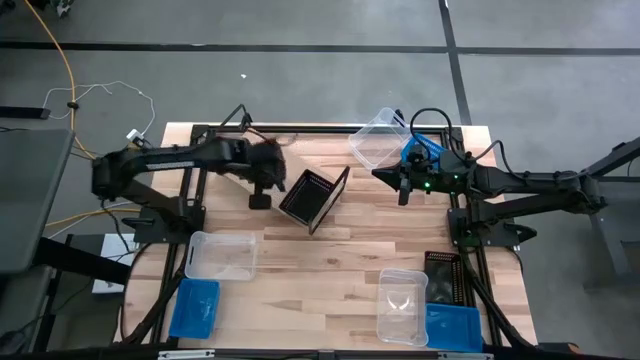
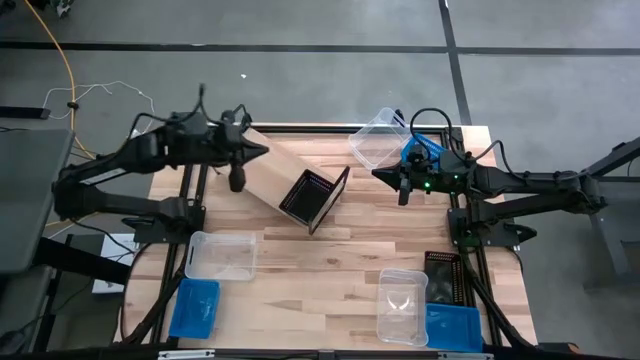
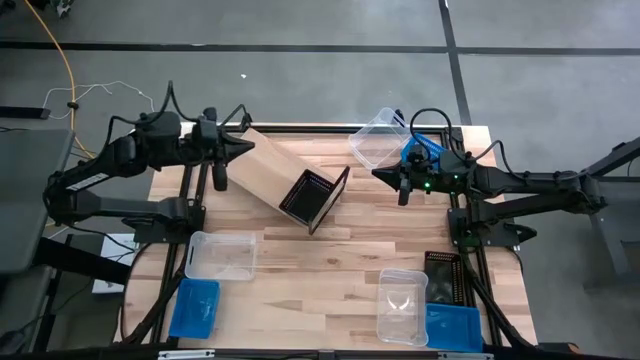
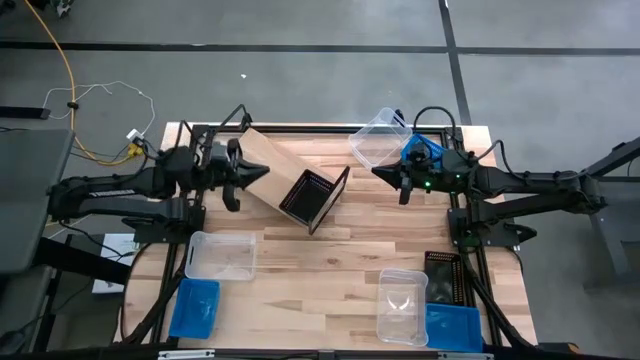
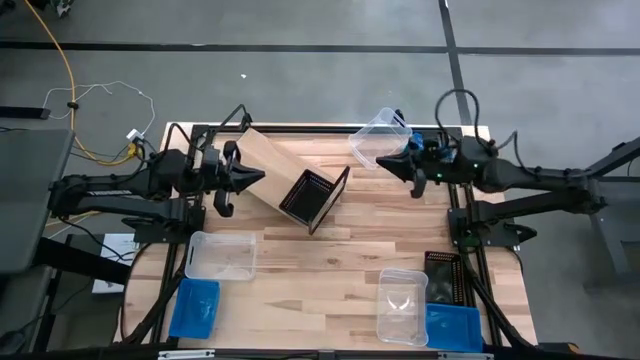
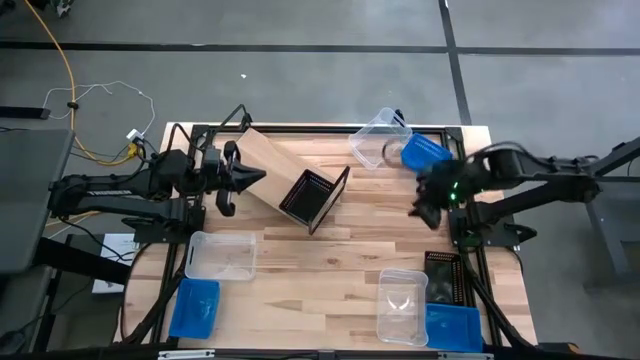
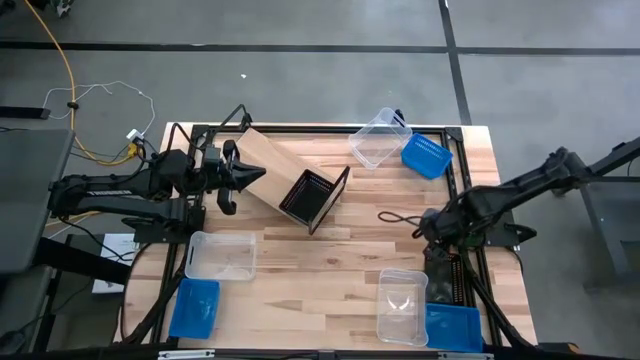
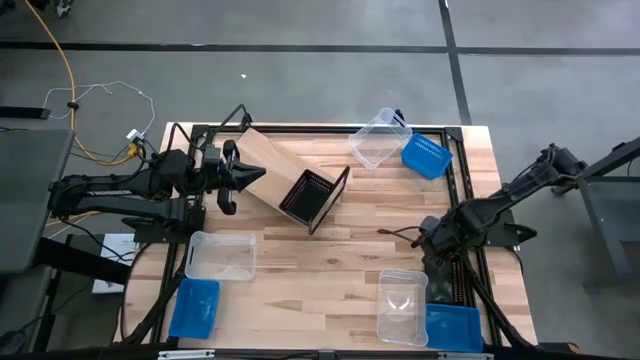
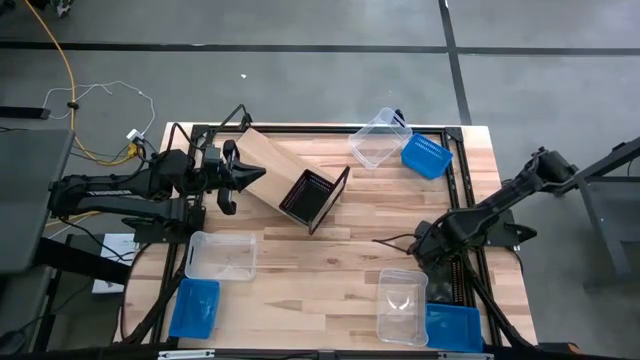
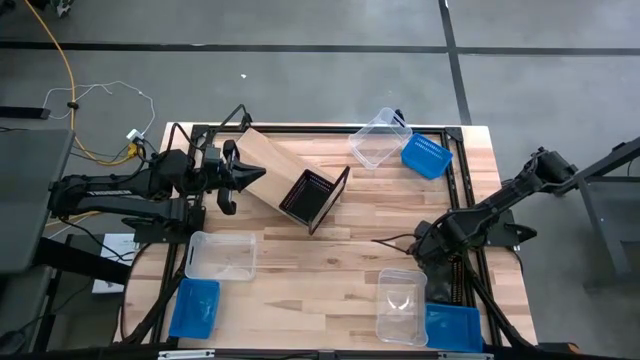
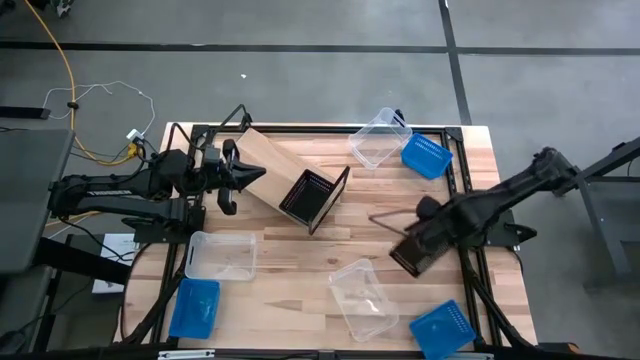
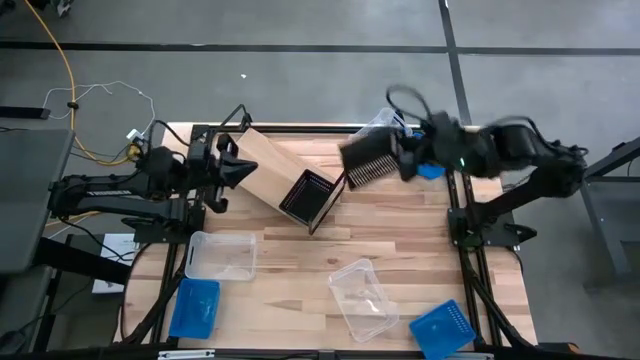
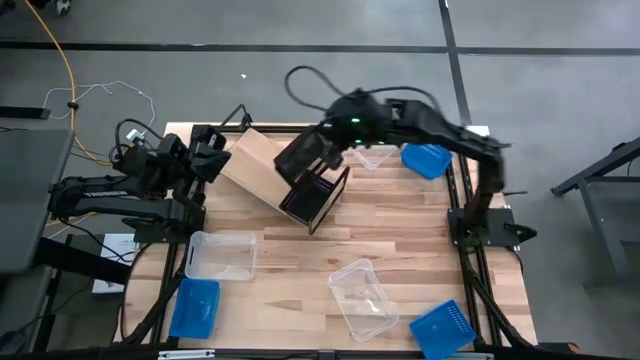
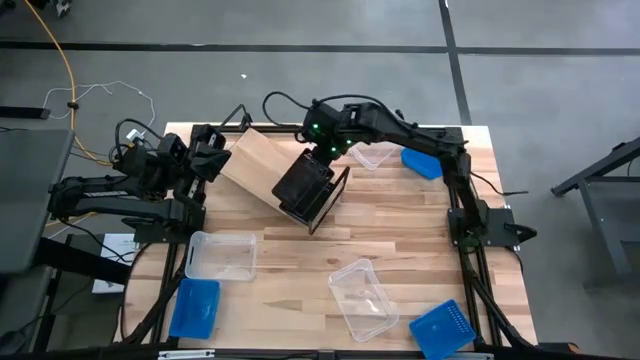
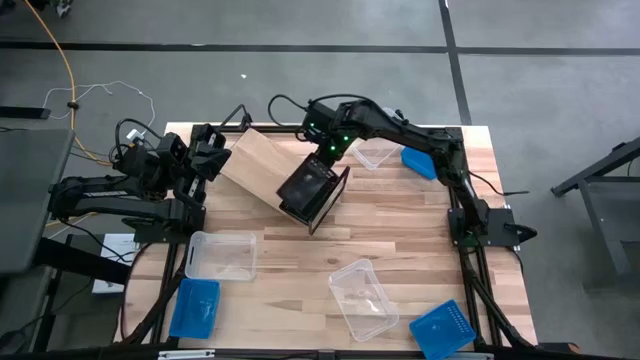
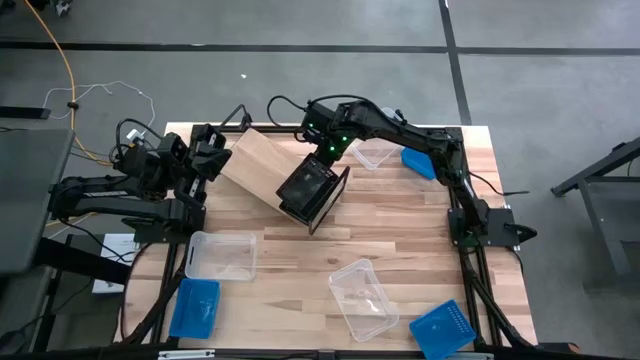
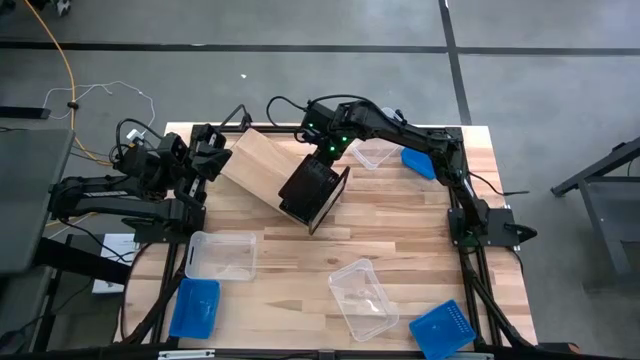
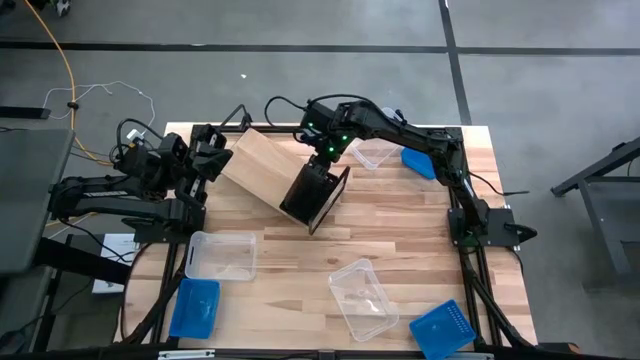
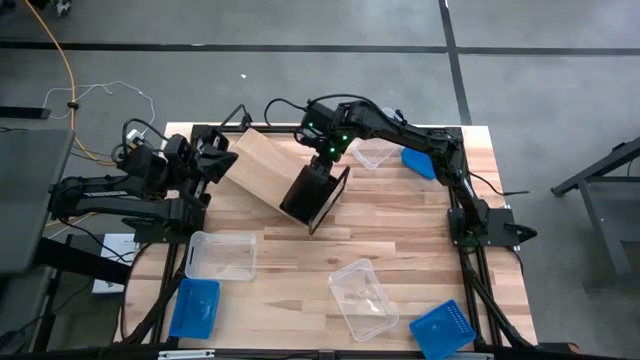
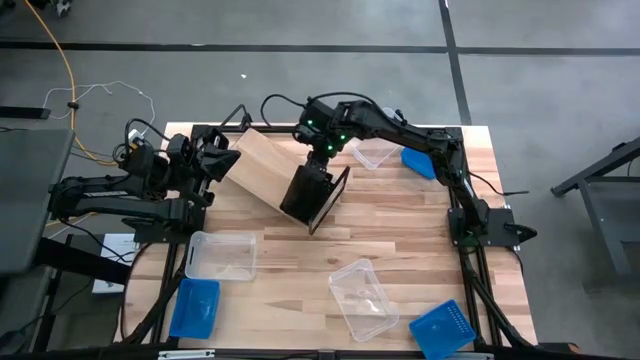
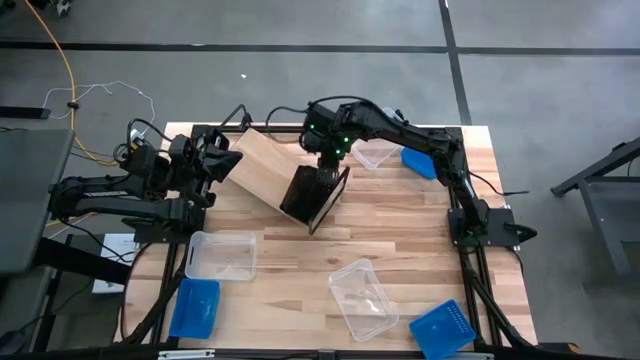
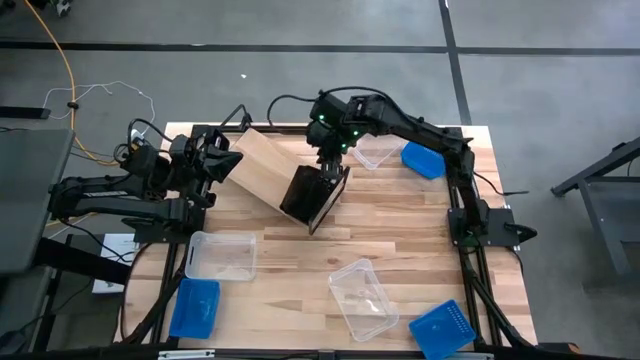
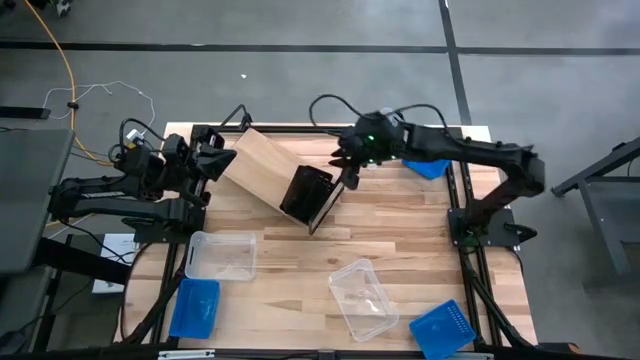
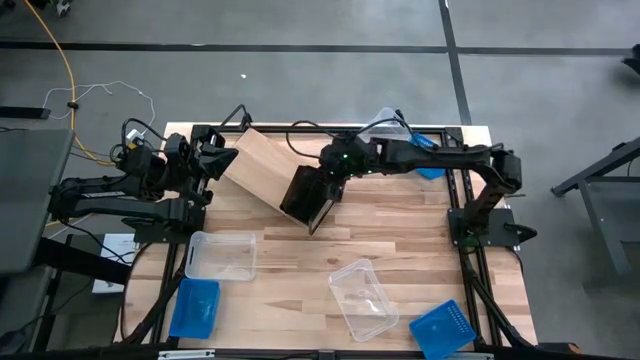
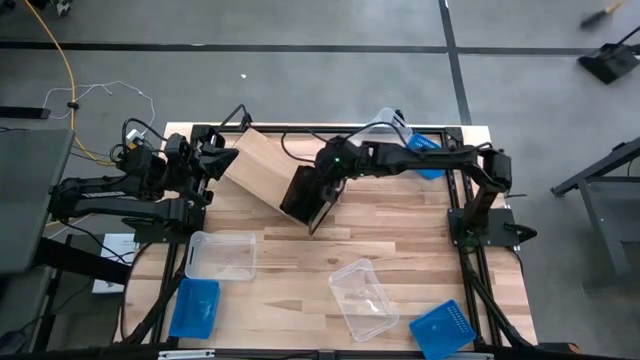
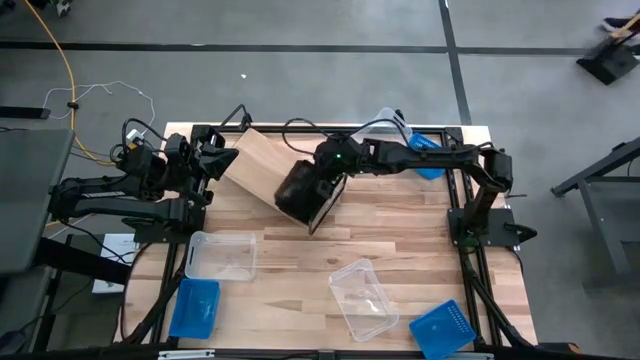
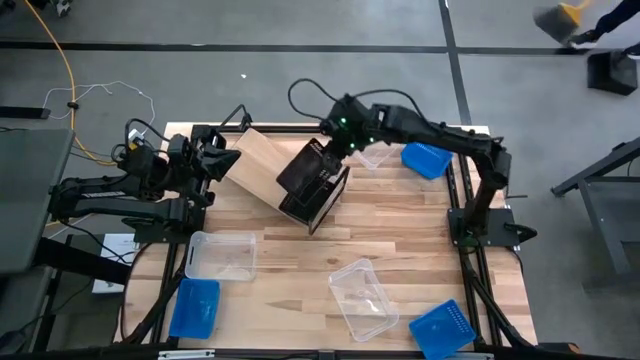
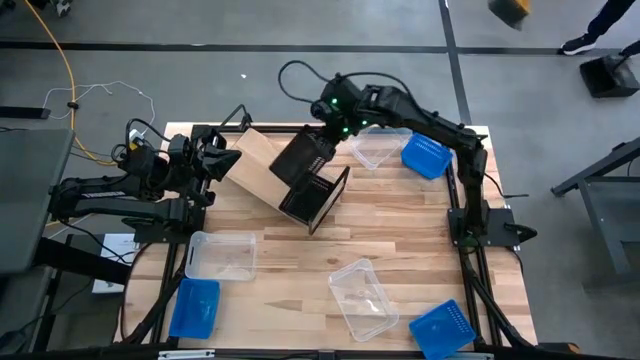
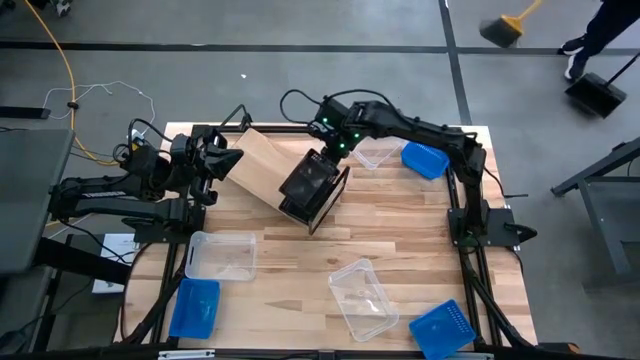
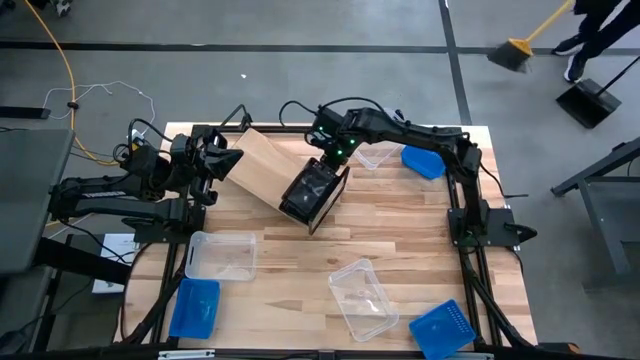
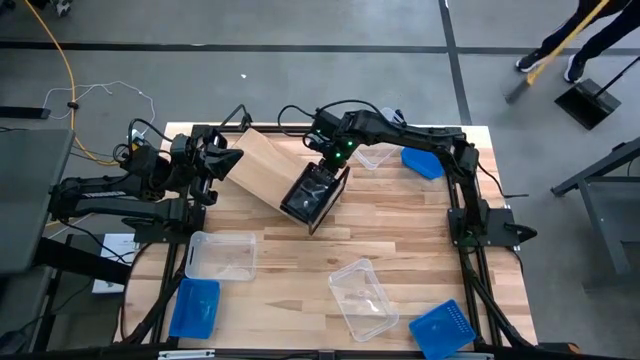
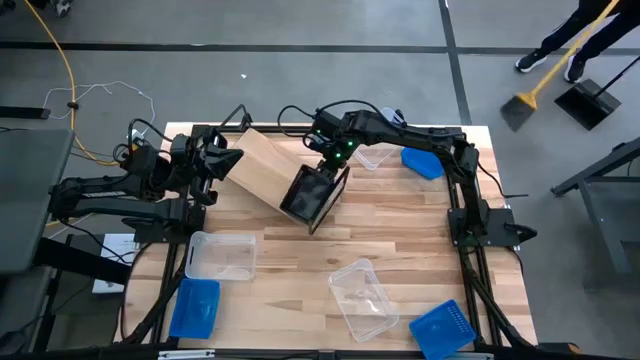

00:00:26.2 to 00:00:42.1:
Task: Stack baskets on shelf by color
Stack the black bin on top of the other black bins on the shelf

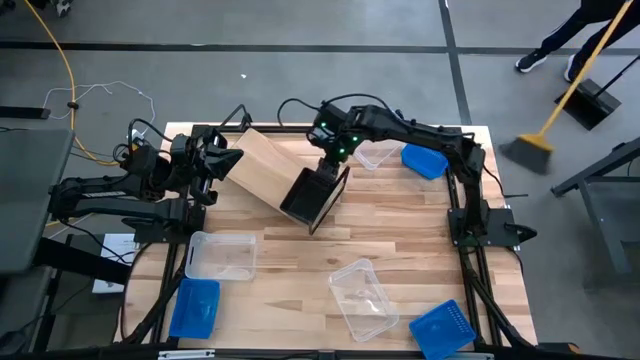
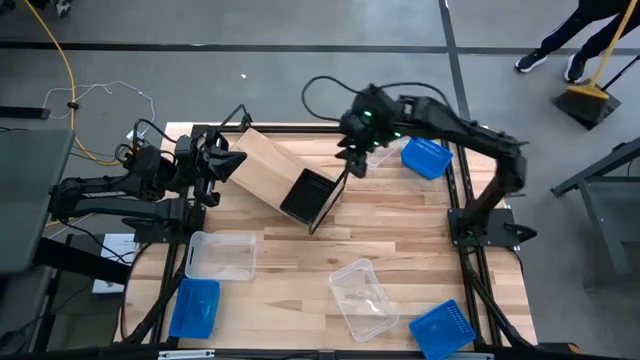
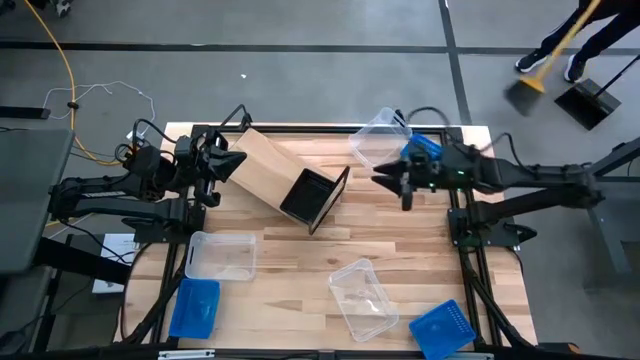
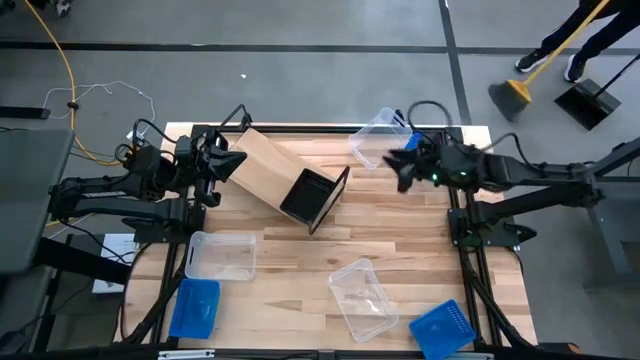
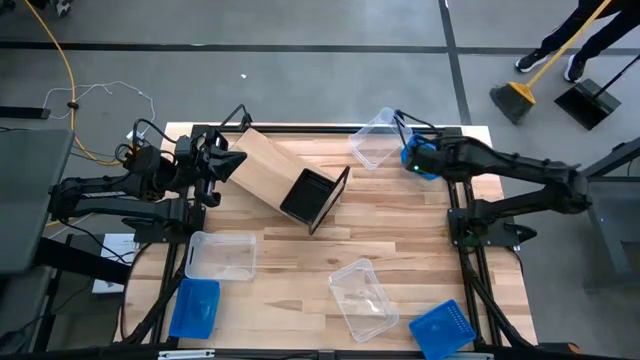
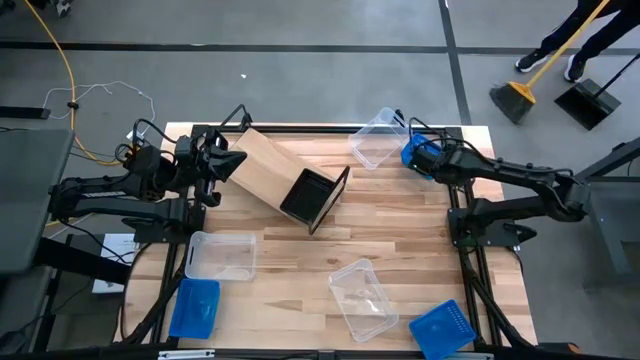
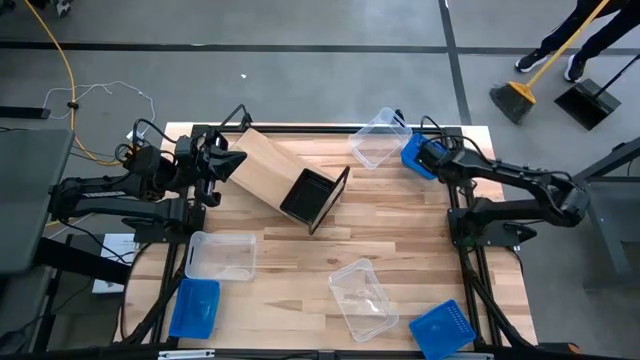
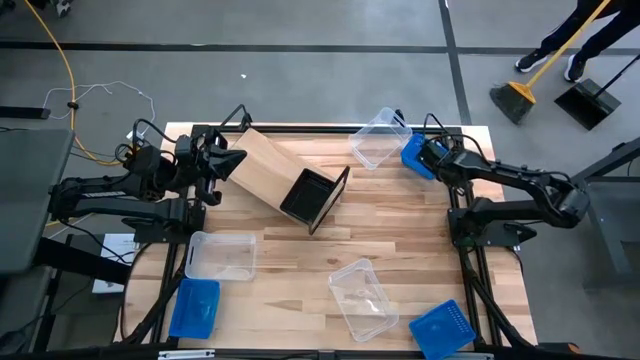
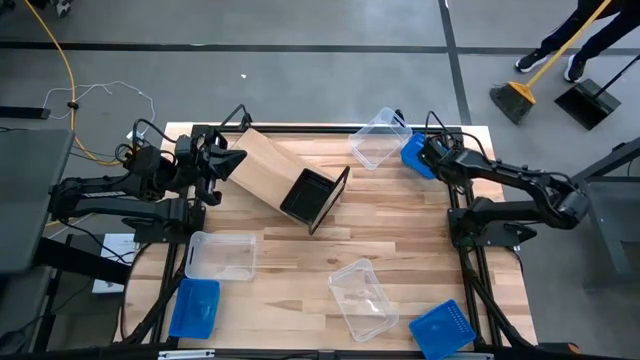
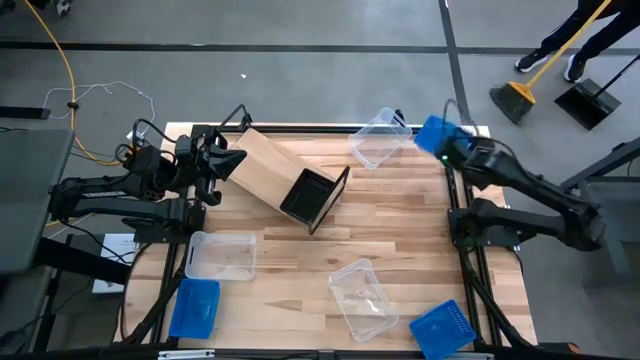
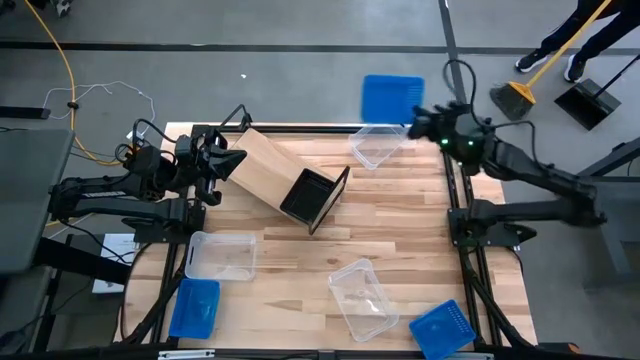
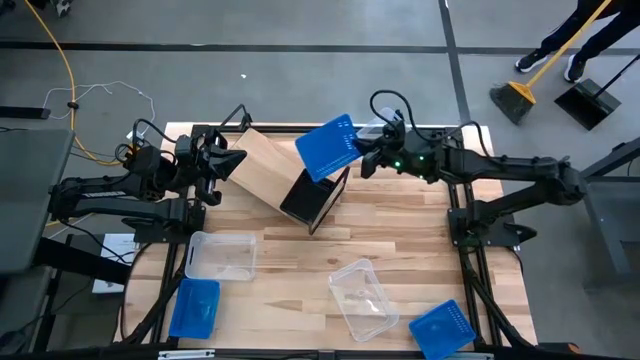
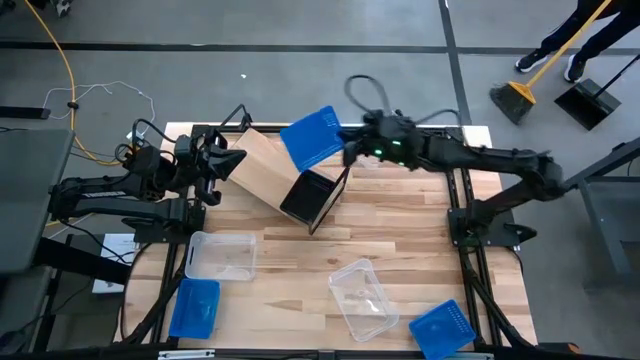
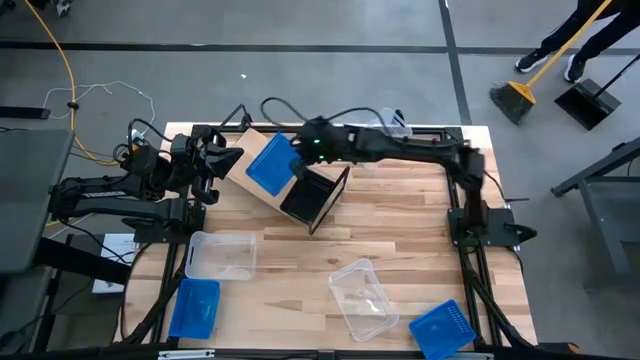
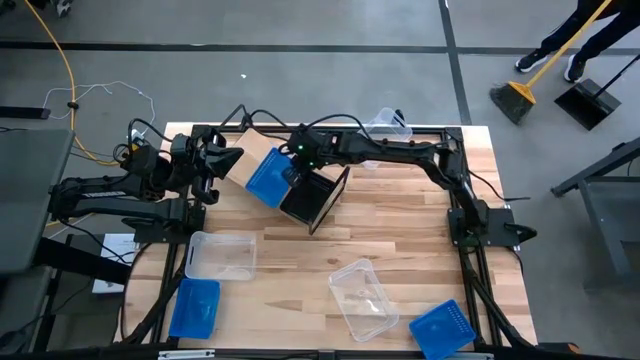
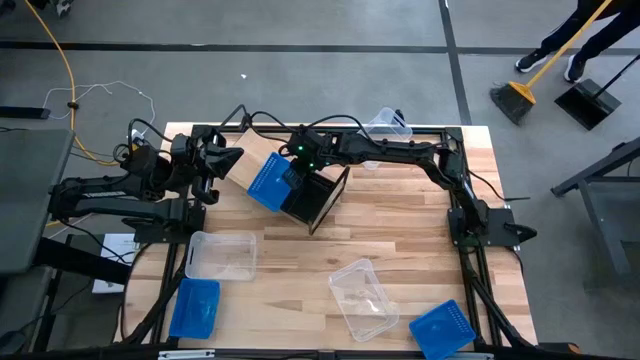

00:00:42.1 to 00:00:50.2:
Put the top blue bin on the shelf
